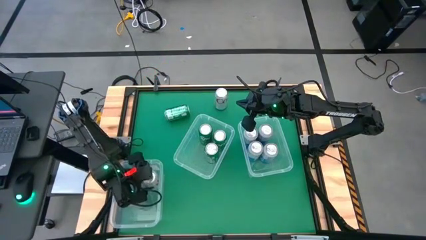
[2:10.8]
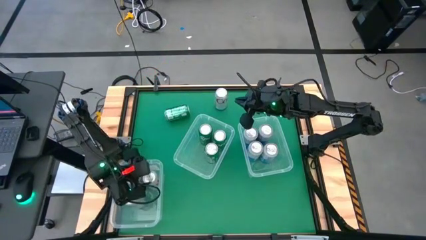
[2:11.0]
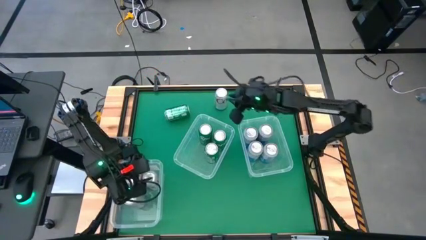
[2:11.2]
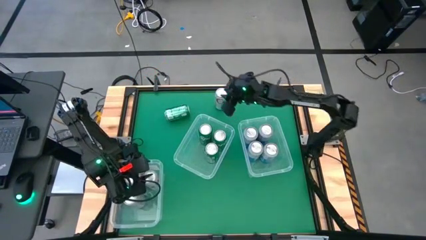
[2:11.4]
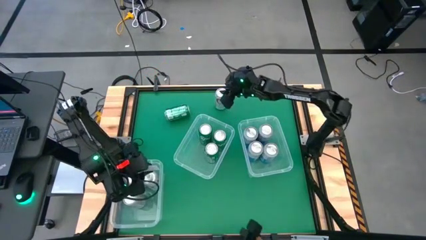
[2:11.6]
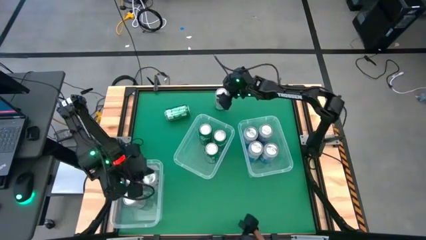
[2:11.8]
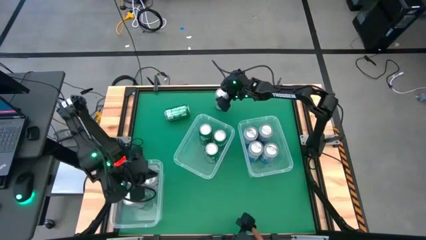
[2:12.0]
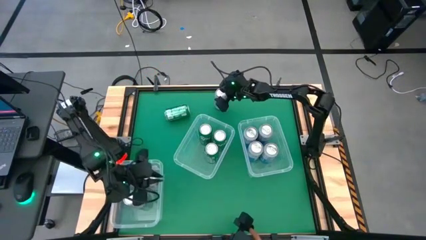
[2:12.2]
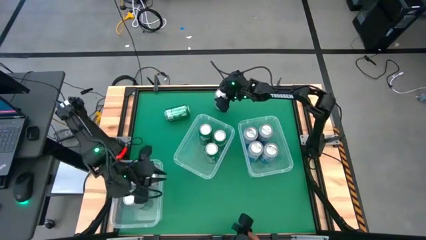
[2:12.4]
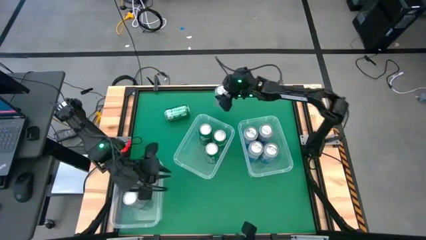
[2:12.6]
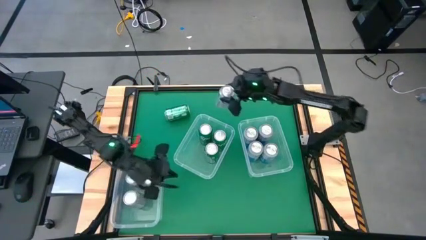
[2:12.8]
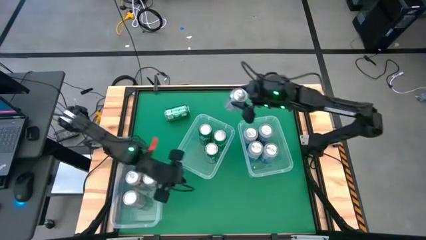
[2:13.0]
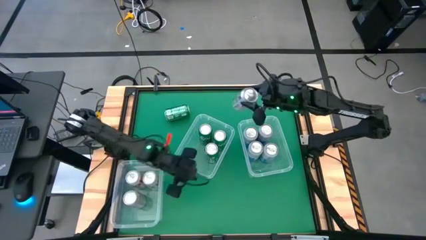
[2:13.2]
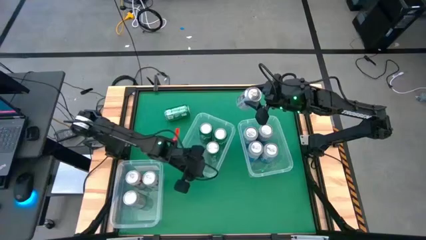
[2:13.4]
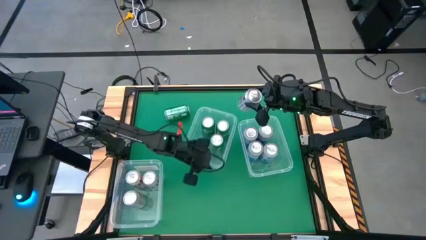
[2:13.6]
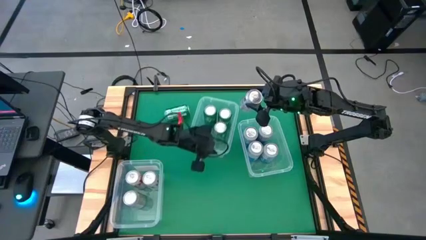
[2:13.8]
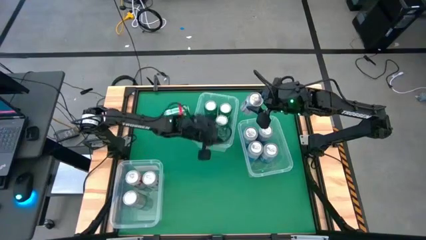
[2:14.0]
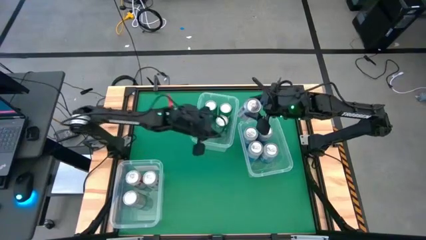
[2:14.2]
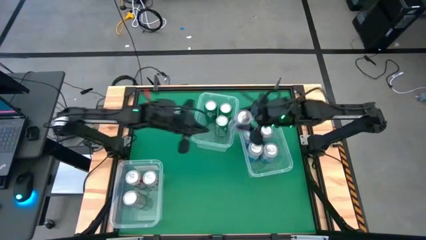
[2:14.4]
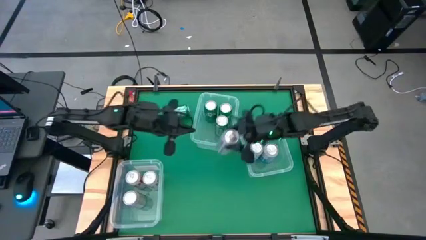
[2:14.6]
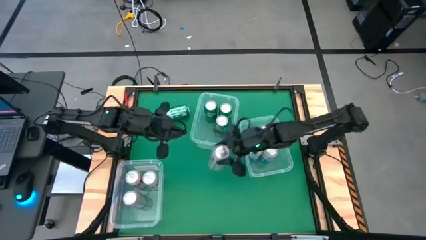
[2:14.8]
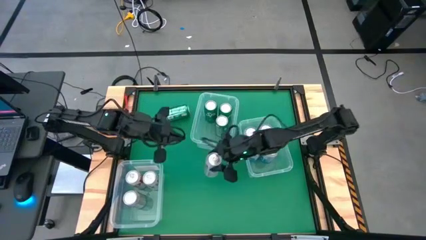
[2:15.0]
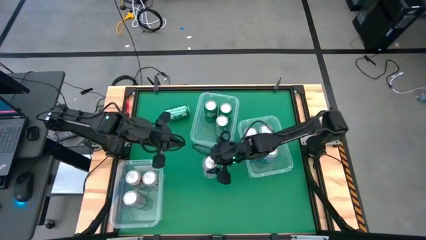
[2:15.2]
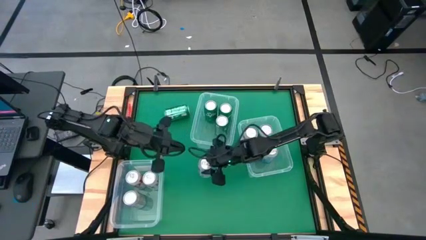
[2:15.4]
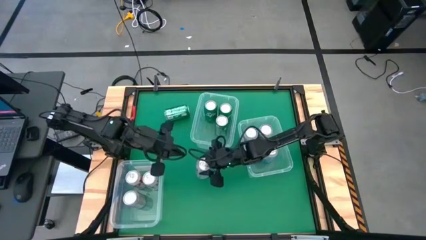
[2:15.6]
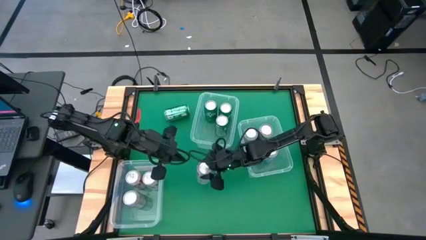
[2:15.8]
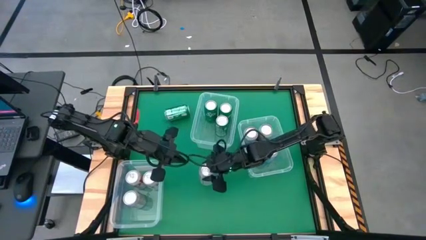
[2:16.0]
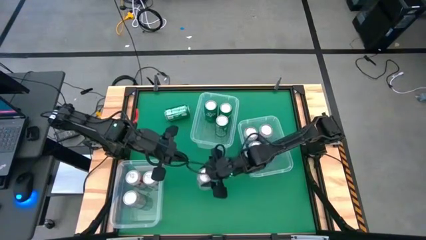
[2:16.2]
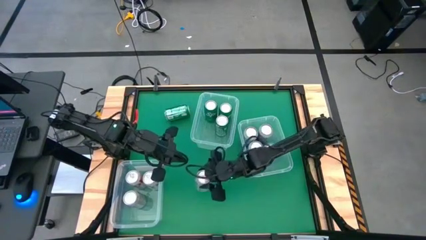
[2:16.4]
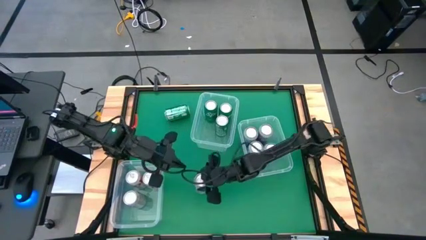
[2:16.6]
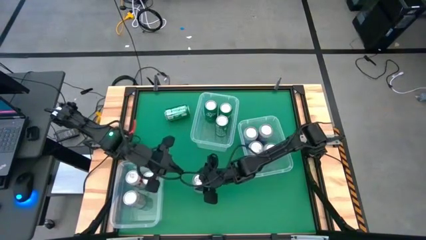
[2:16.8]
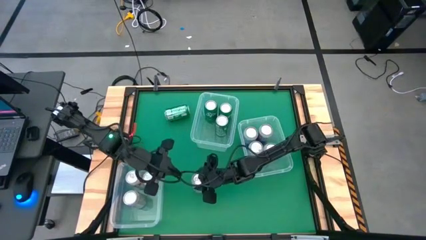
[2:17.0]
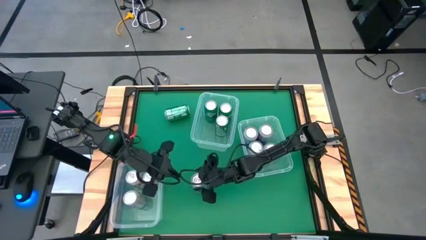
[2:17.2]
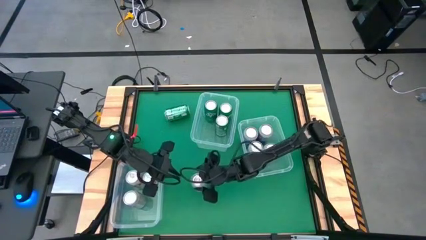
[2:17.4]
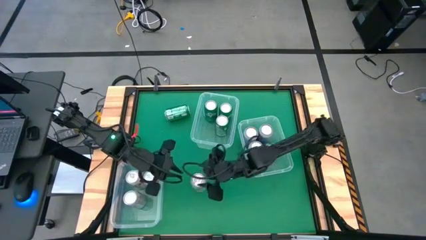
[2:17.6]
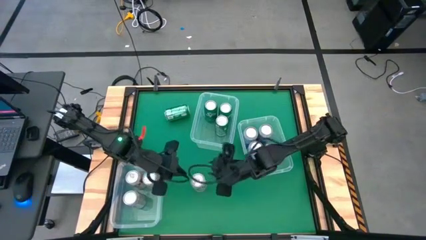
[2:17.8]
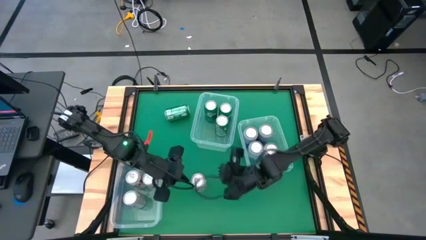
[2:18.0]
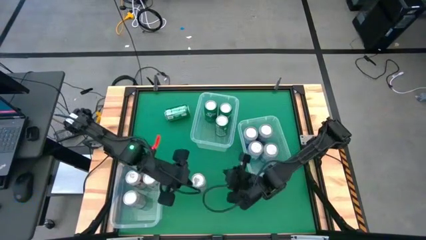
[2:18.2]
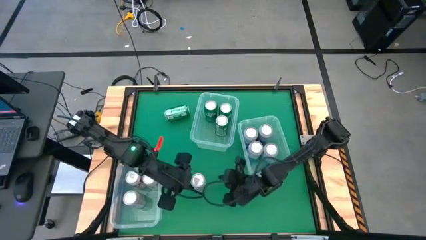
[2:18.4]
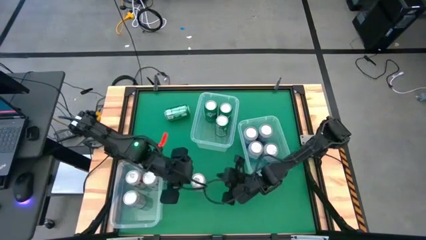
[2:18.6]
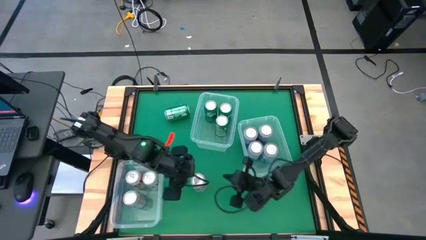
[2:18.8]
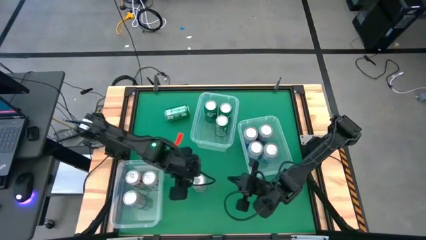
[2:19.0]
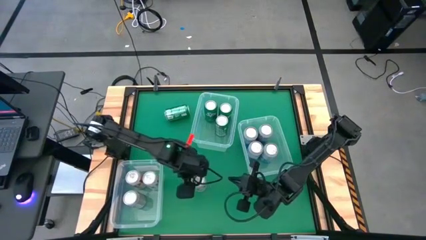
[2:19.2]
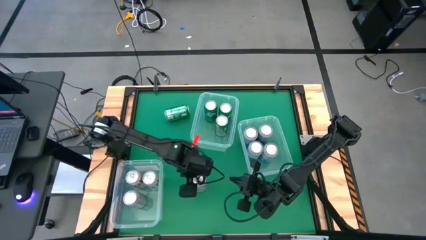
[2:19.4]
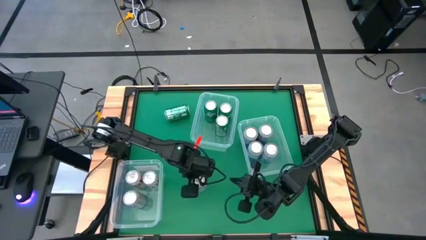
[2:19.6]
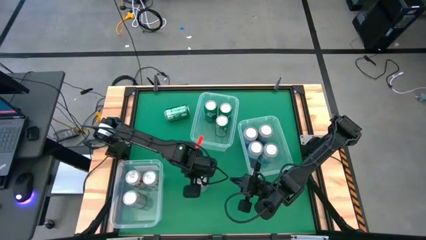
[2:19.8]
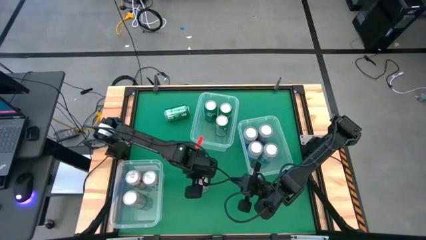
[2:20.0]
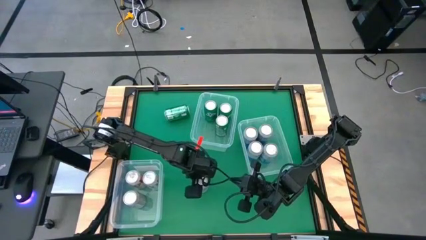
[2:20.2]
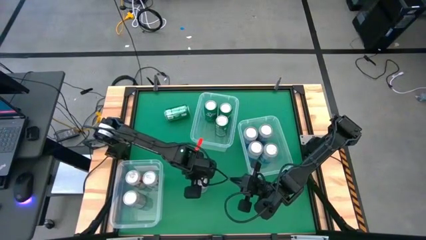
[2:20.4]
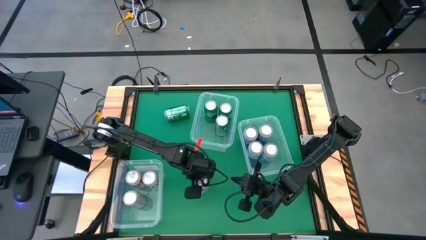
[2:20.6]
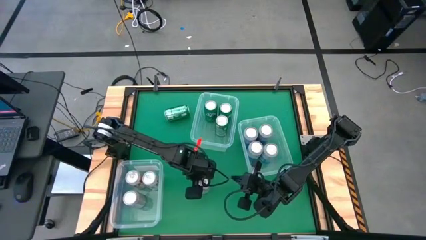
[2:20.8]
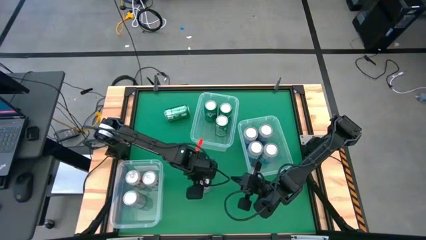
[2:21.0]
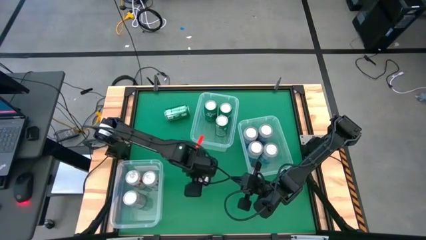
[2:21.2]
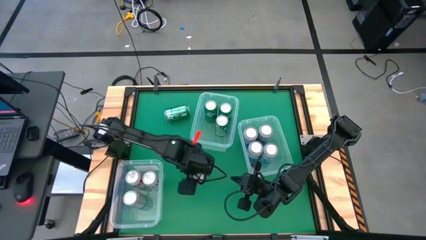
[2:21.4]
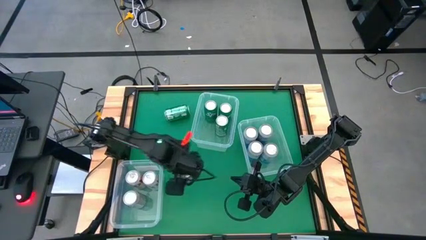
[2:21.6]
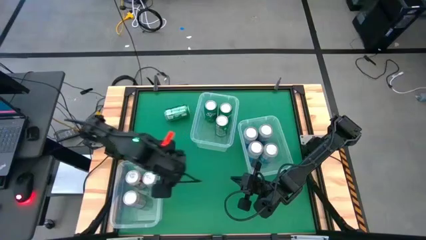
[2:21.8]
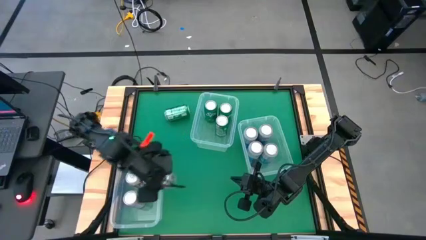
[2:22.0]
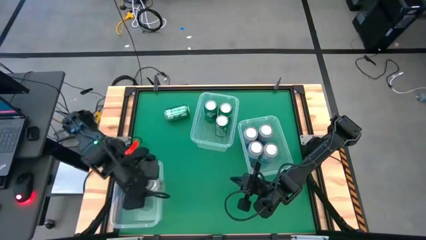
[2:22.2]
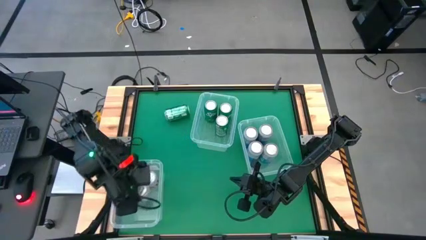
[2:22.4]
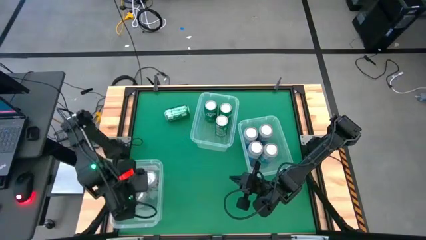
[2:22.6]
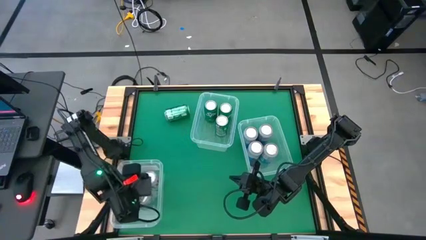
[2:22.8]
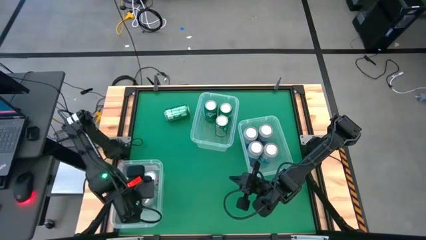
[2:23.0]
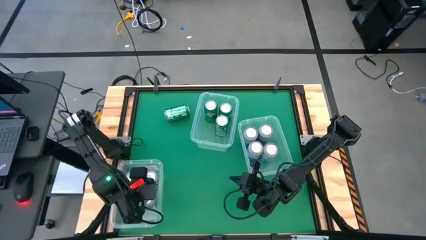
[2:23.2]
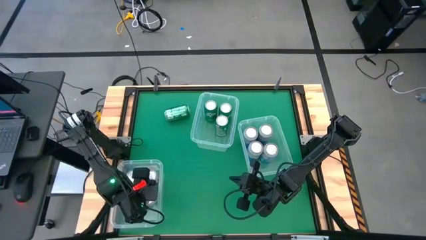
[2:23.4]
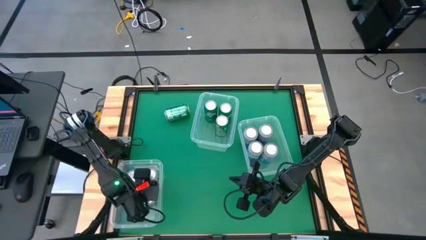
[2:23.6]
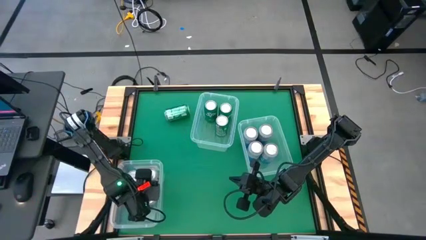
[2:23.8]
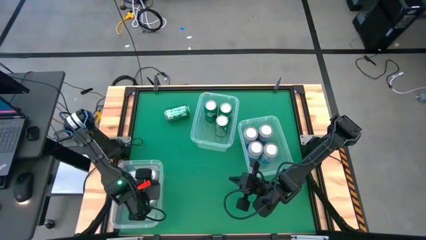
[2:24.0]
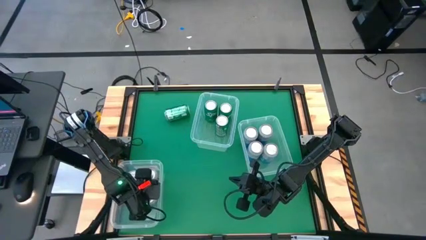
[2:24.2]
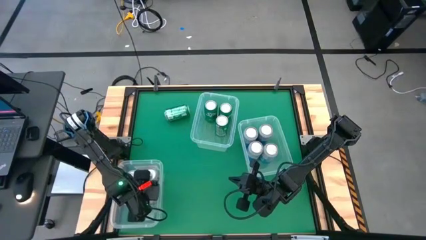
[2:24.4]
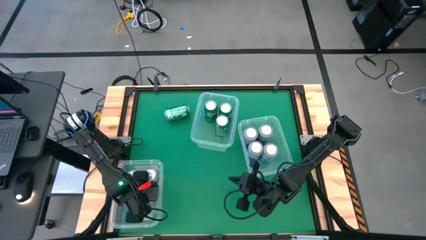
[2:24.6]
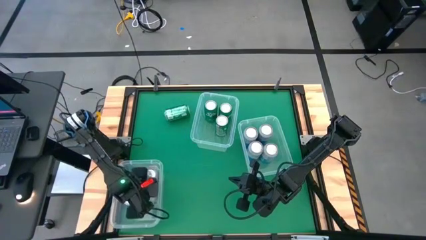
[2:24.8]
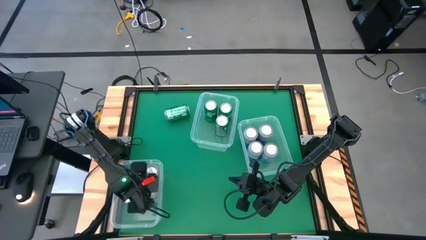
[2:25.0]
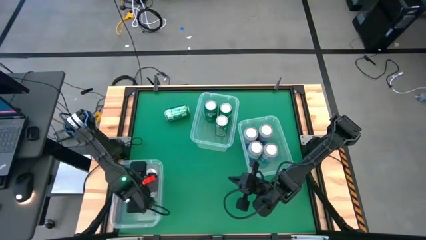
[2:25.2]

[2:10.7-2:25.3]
Task: Sort soda cans
Put the silver soda can into the bottom left transparent bin

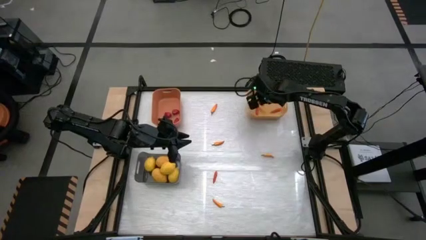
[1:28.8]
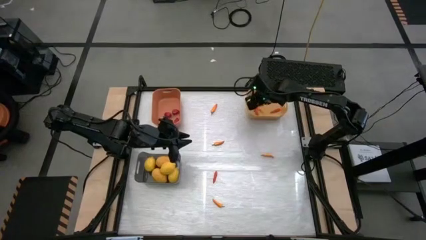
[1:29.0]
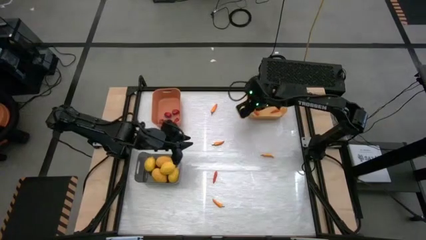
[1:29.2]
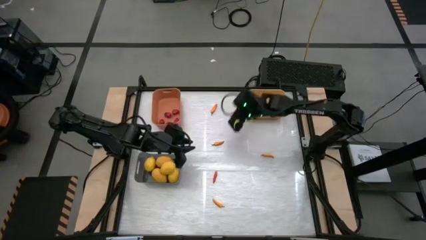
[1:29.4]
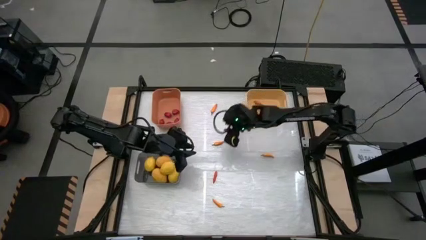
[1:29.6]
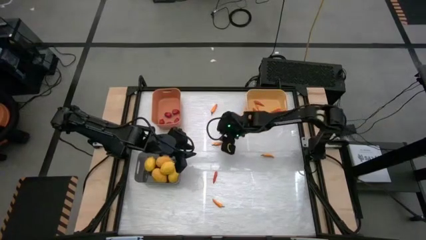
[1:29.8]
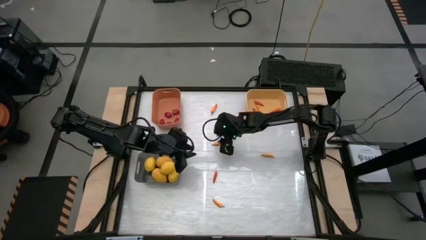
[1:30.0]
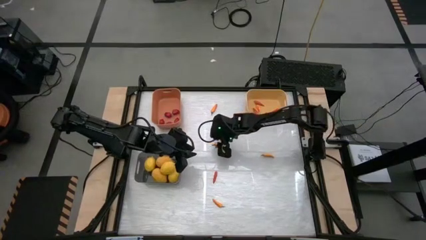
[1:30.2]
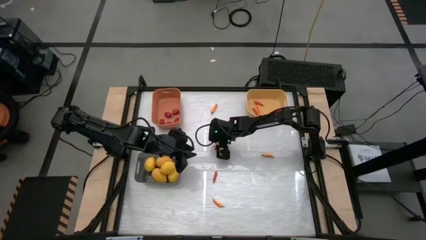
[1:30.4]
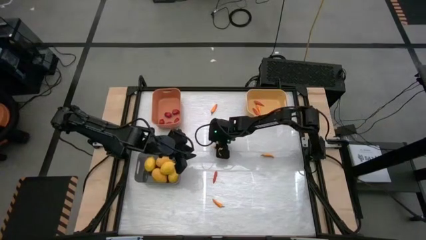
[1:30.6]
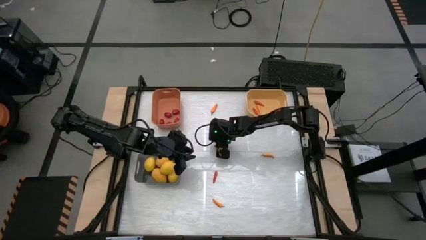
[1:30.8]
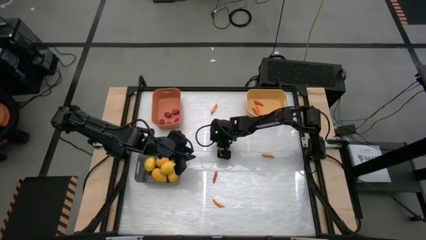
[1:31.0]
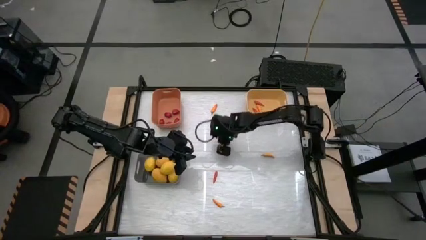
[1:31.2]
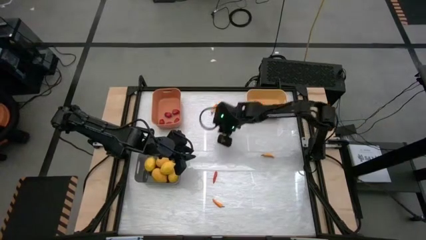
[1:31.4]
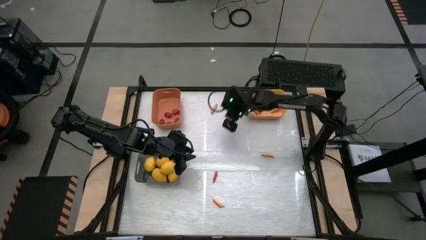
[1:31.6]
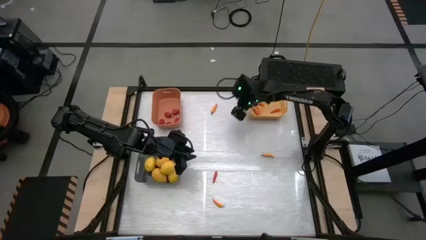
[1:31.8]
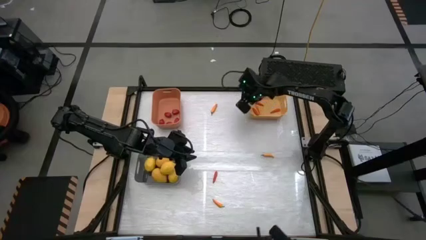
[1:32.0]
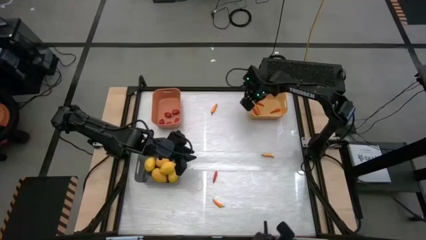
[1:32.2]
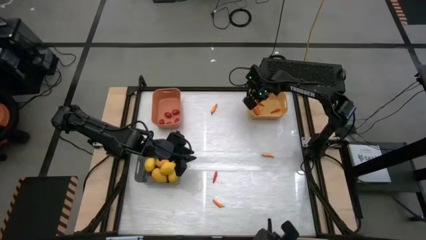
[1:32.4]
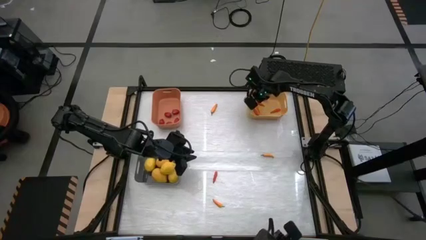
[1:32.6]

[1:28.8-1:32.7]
Task: Sort produce into baskets
Put the yellow chili pepper into the yellow bin
